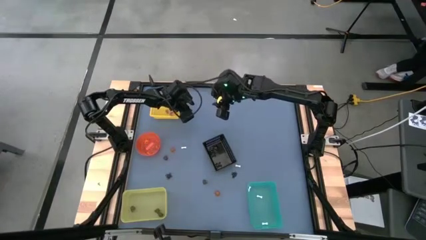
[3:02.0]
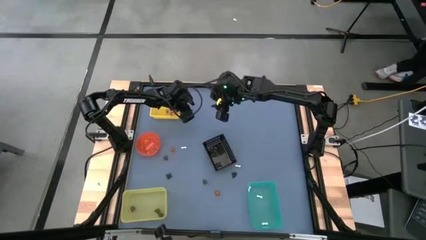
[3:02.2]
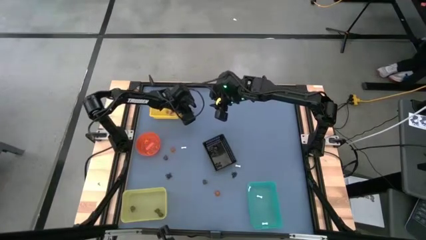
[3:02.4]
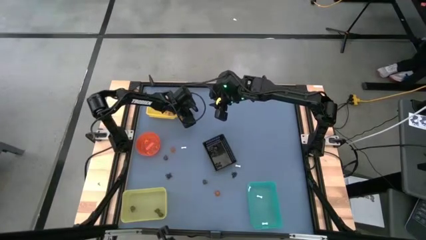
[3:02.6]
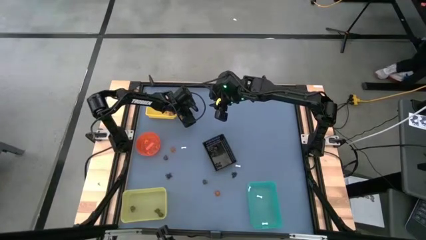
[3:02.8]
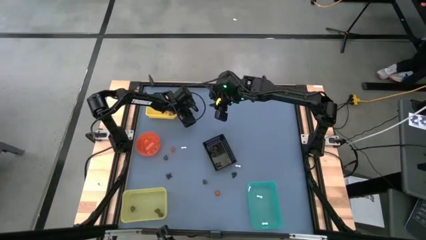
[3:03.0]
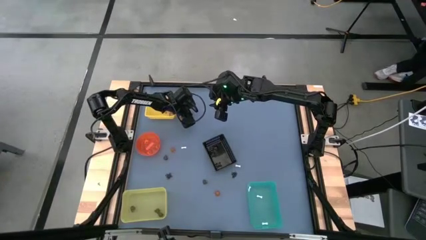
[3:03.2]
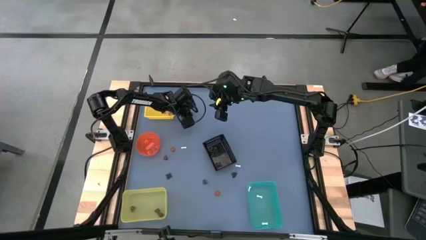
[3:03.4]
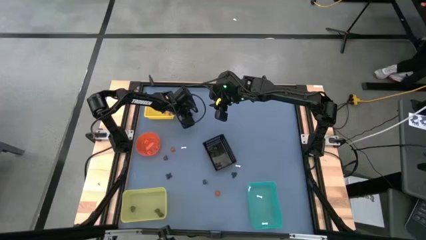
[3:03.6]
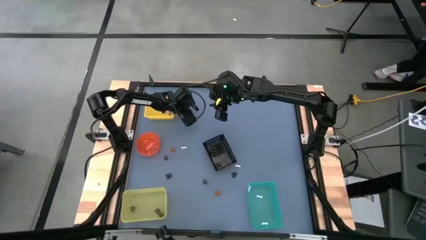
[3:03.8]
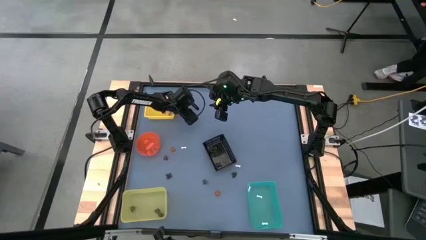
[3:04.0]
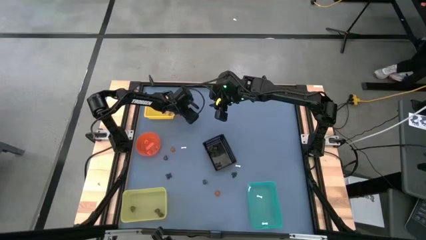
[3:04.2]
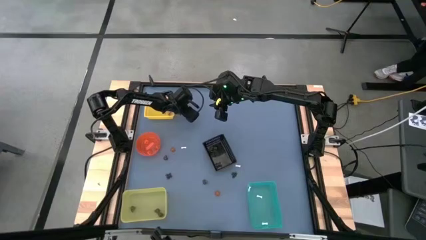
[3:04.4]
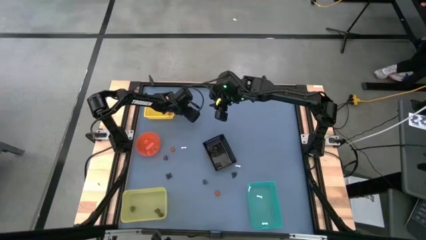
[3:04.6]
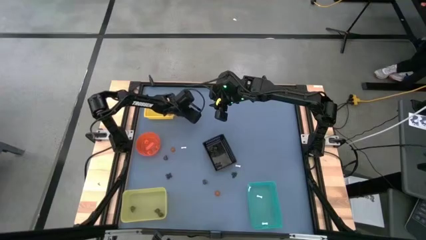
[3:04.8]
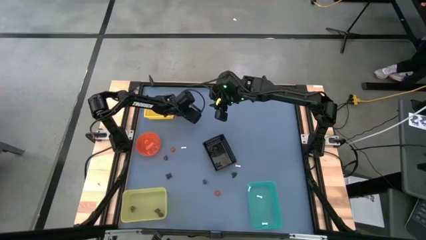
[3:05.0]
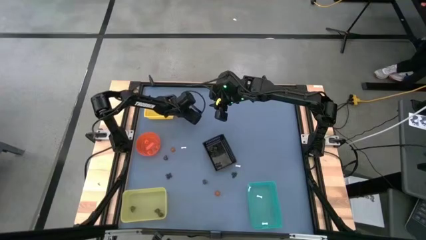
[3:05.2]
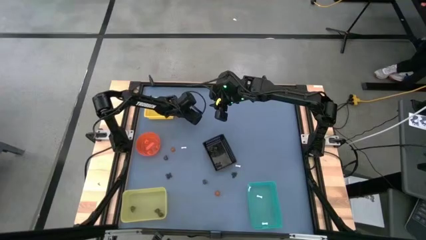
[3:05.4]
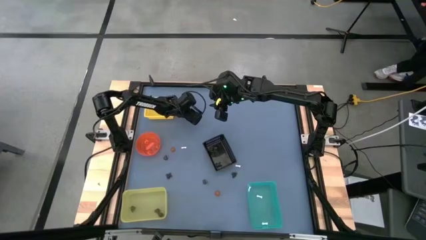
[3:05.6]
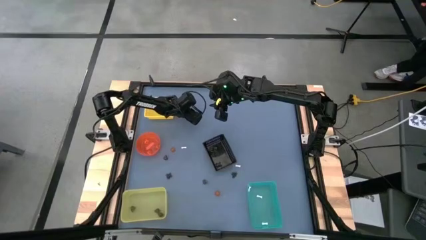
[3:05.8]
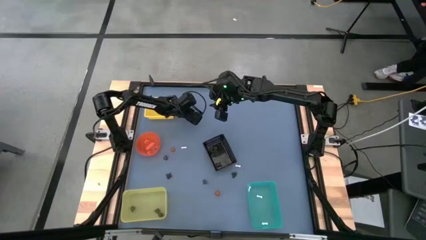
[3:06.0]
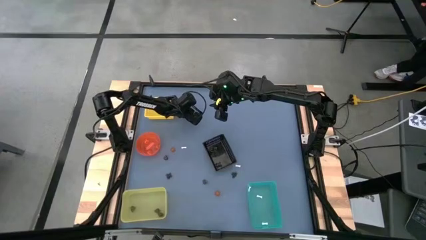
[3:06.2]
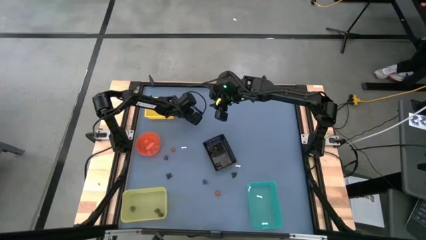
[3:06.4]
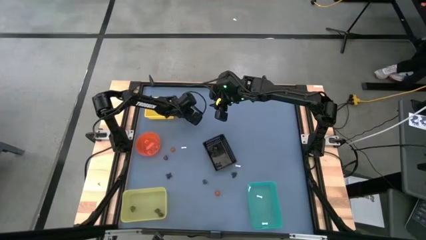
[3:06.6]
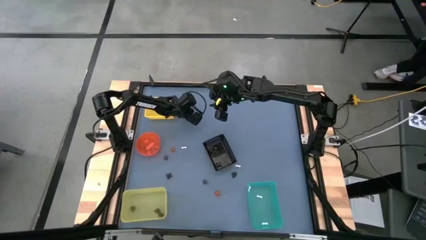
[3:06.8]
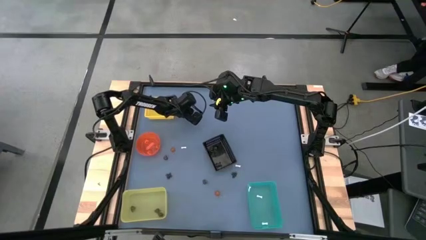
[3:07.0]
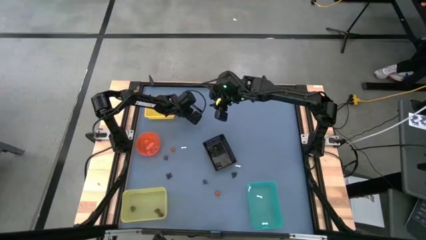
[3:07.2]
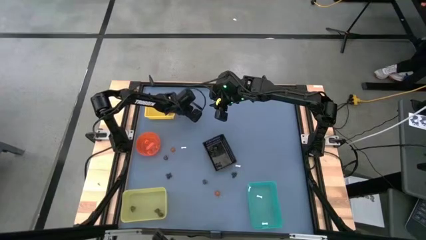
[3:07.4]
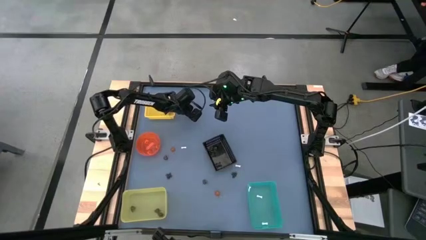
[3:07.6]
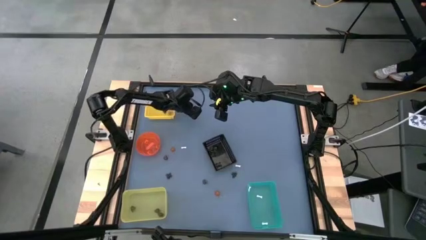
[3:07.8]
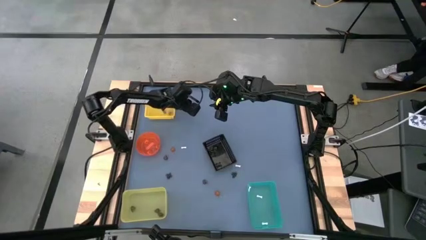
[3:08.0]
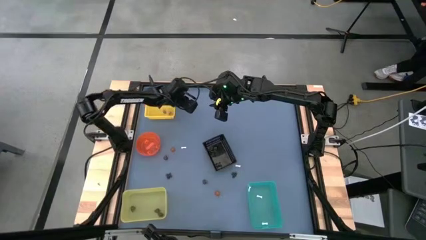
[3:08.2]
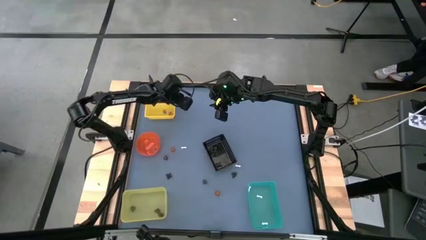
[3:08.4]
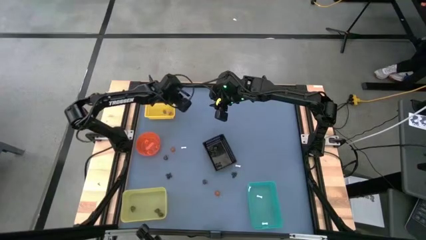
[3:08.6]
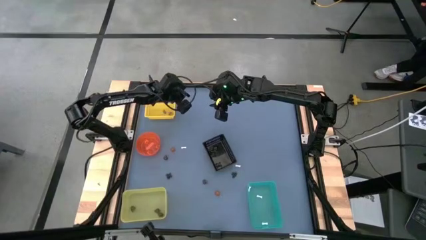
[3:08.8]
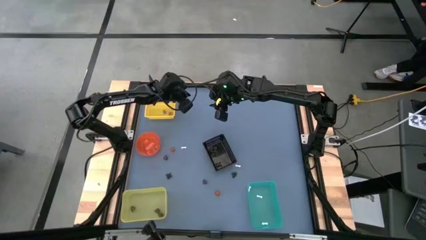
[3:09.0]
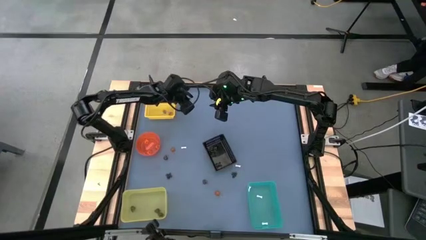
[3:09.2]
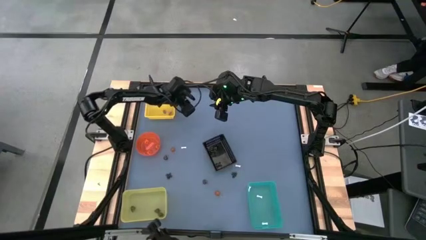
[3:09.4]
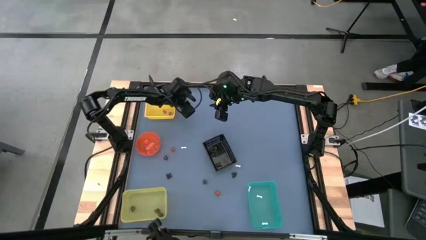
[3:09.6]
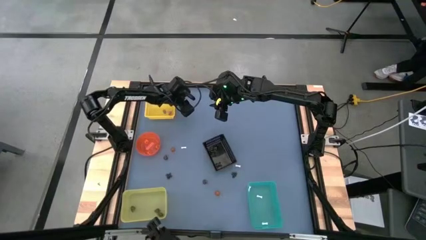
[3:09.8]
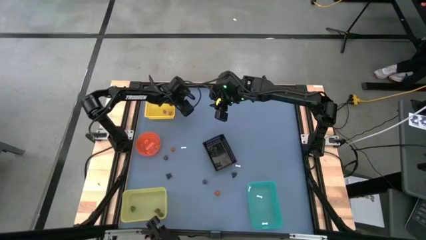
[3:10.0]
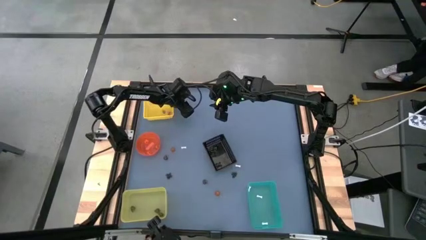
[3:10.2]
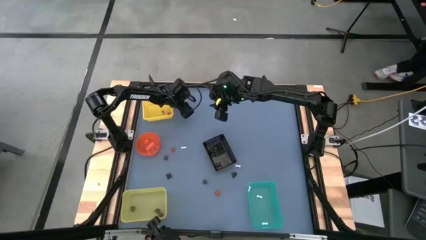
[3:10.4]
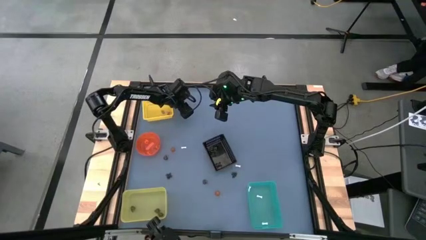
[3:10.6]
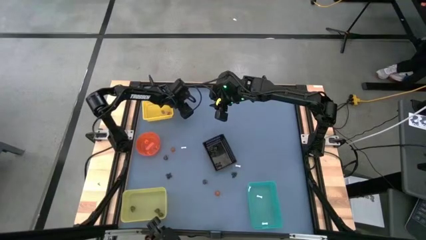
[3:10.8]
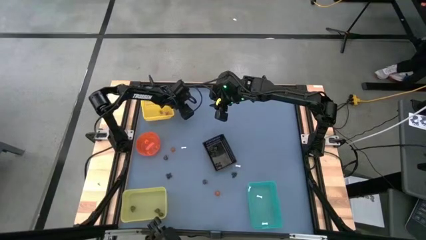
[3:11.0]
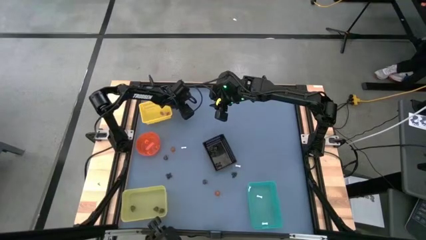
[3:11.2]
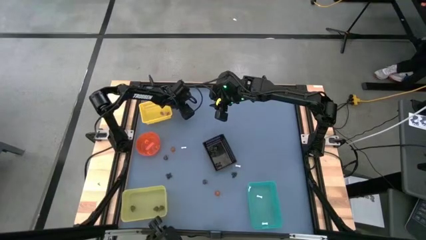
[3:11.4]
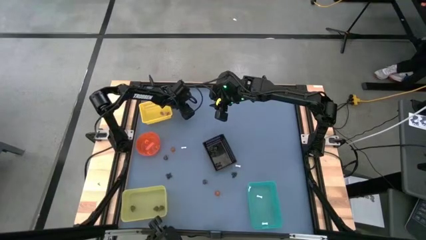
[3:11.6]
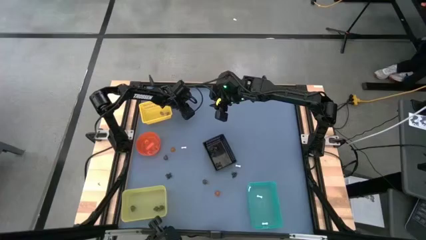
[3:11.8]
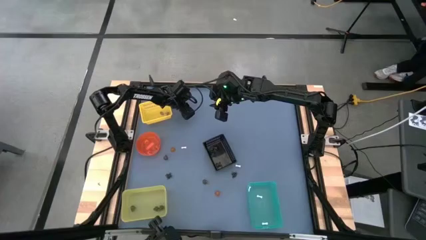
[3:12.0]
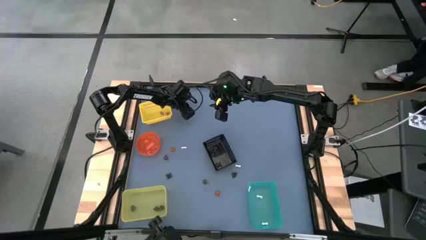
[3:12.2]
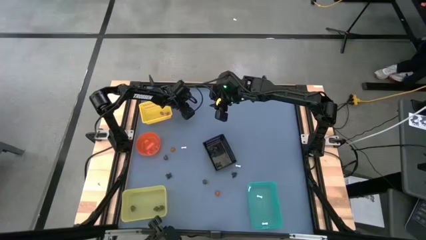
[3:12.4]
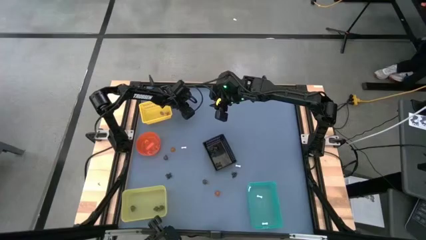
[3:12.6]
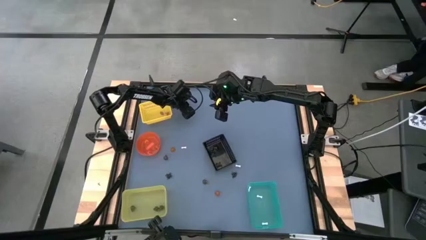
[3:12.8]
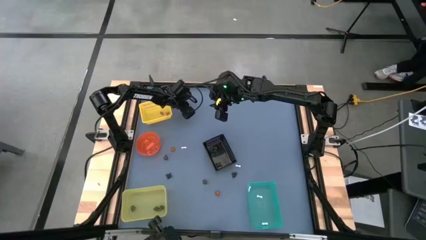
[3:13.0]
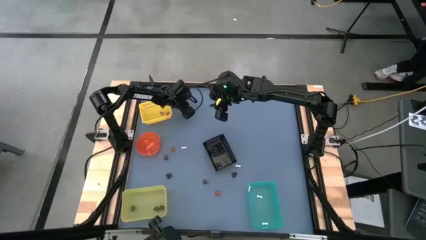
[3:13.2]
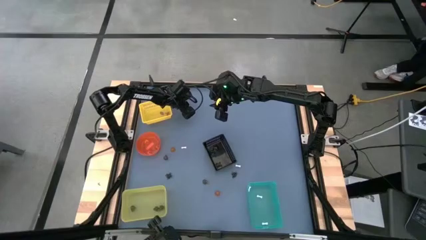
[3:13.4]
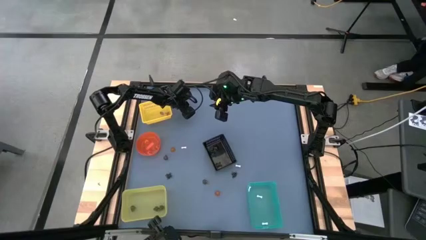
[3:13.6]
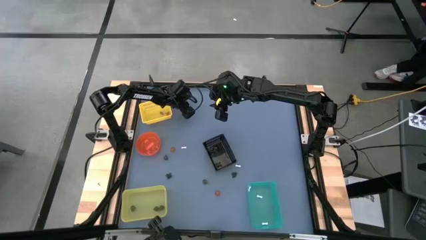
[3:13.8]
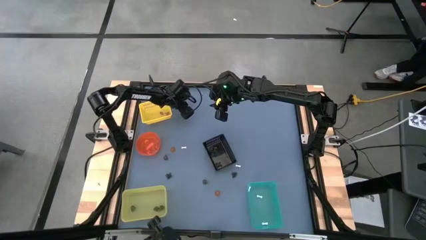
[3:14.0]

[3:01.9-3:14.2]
Task: Sort Halloween decoration
Put the violet witch hat into the top yellow bin

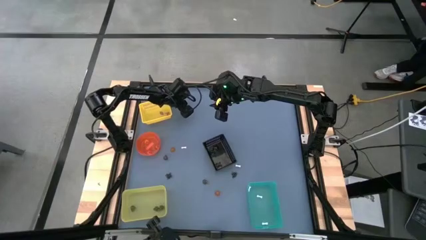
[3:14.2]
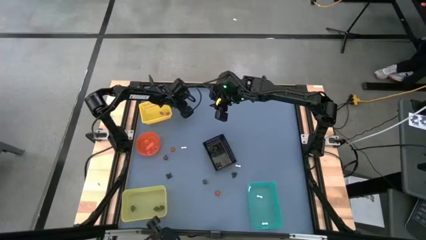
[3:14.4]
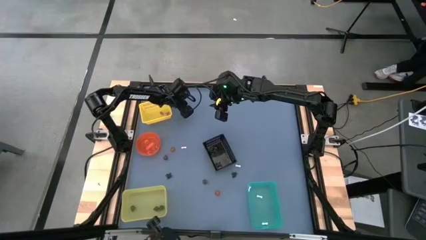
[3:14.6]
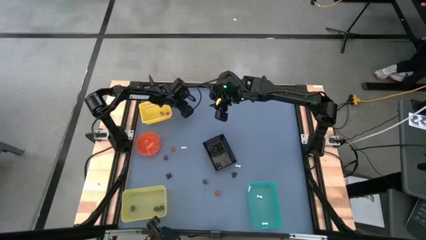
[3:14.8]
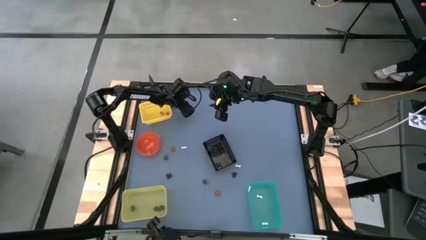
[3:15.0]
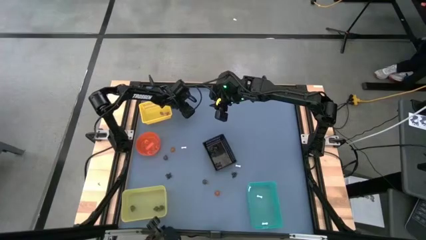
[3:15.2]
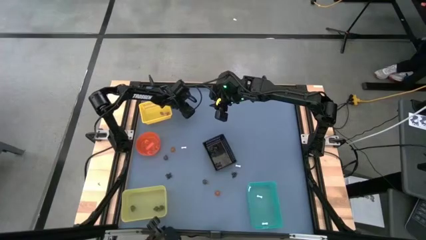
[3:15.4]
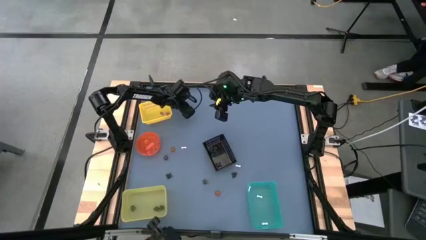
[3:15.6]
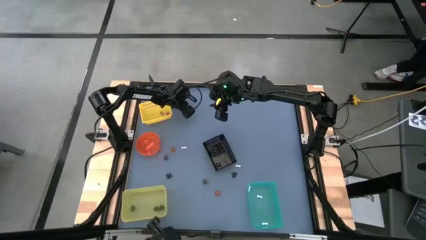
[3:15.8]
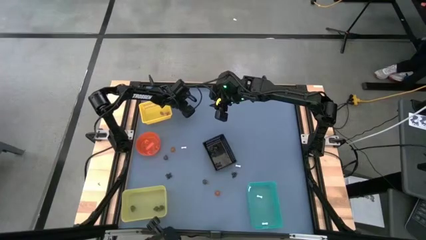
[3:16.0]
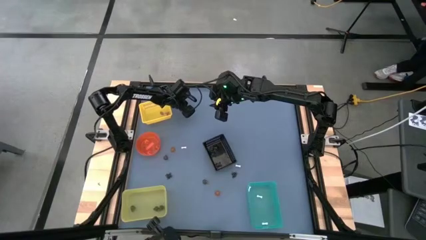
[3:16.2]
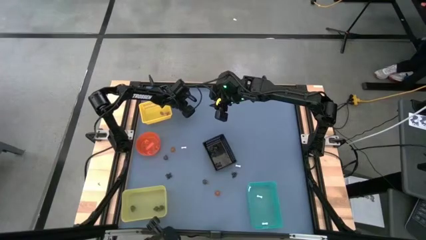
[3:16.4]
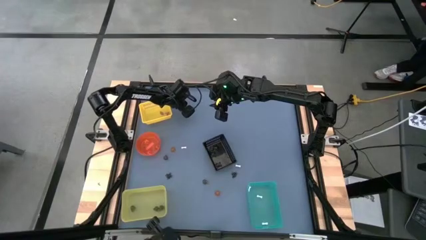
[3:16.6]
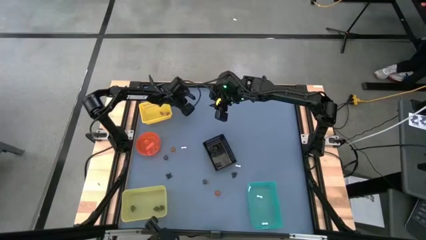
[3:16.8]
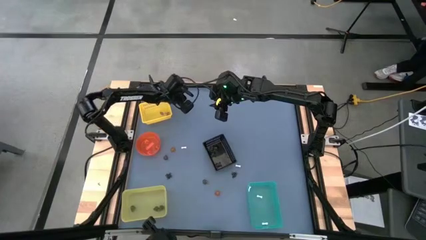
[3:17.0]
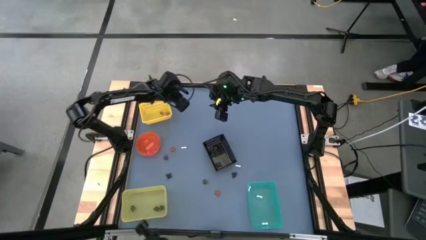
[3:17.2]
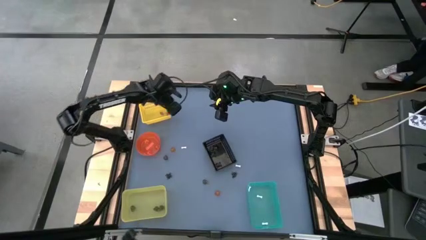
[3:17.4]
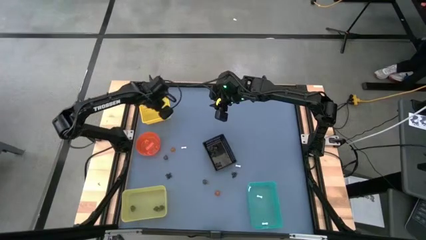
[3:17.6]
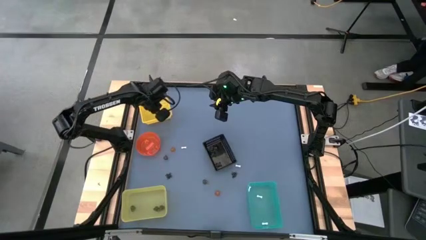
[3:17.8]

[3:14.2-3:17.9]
Put the violet witch hat into the top yellow bin
